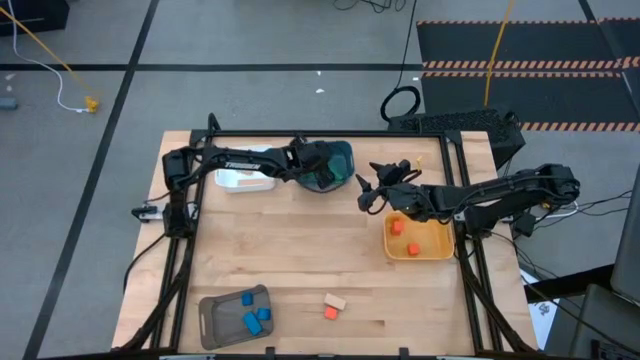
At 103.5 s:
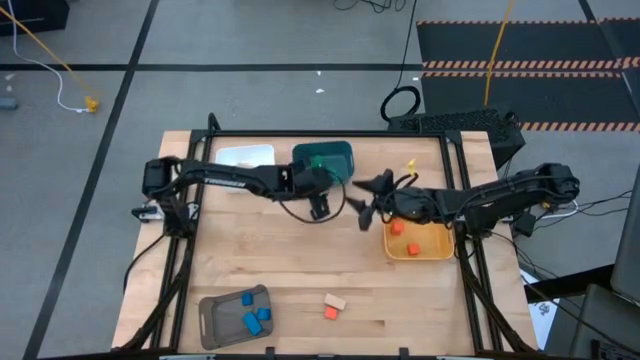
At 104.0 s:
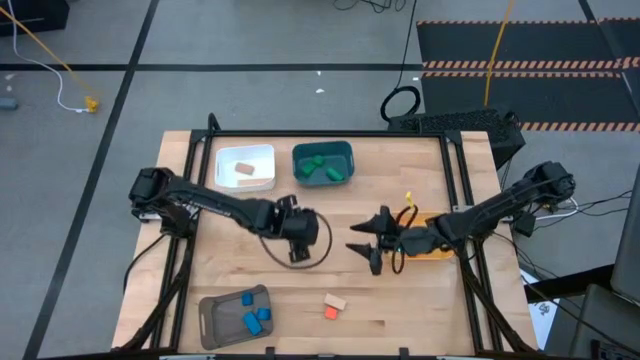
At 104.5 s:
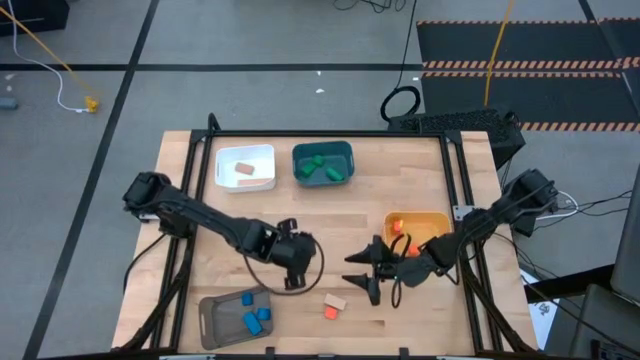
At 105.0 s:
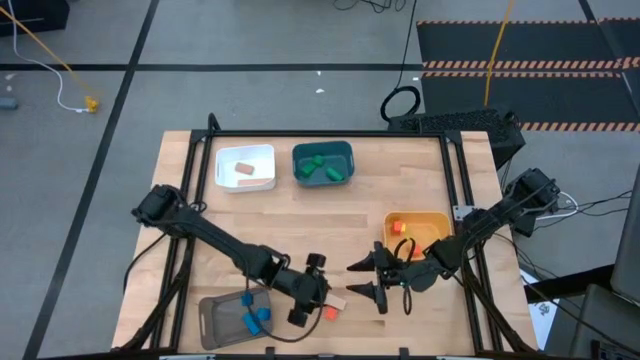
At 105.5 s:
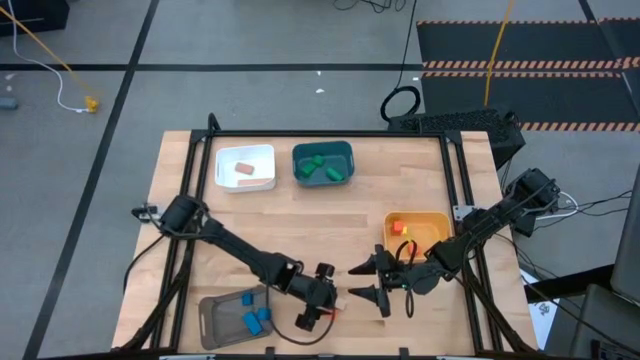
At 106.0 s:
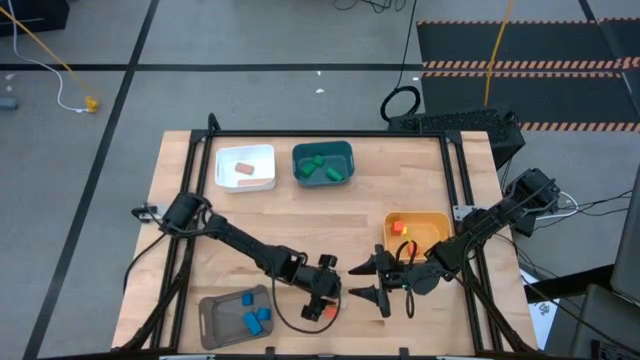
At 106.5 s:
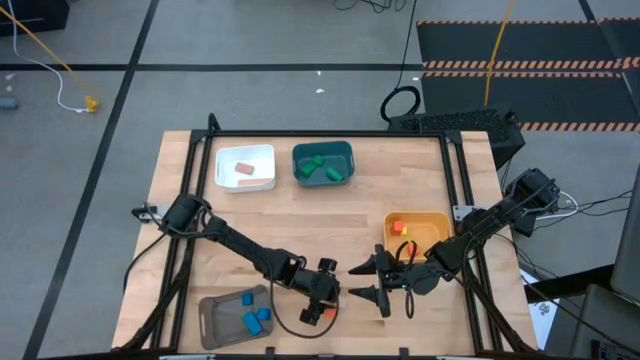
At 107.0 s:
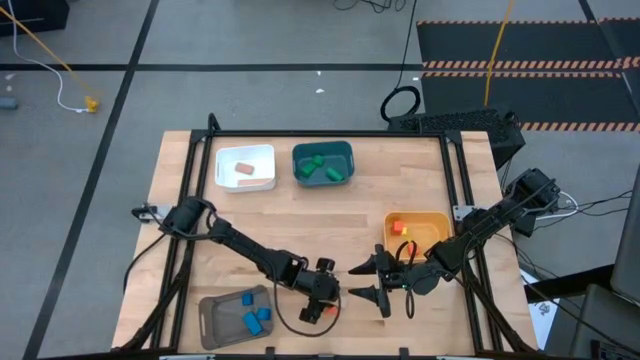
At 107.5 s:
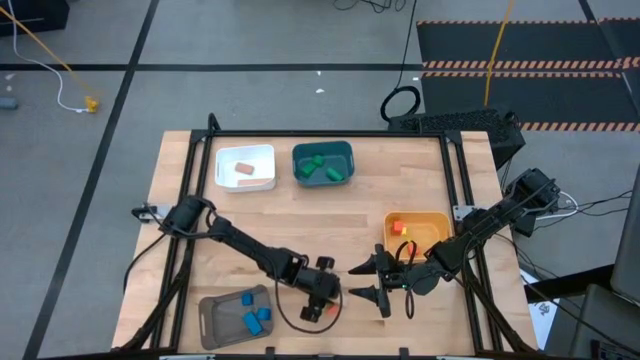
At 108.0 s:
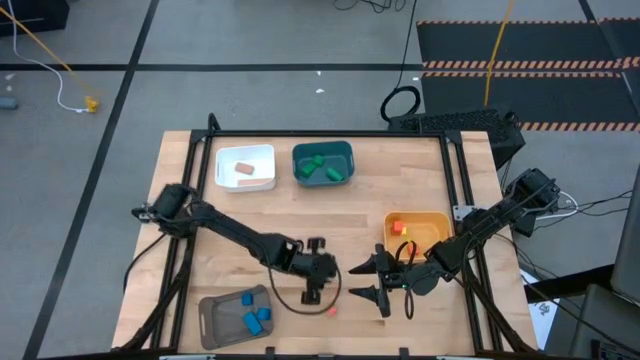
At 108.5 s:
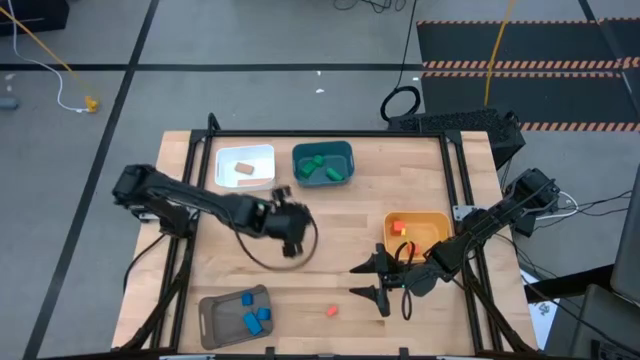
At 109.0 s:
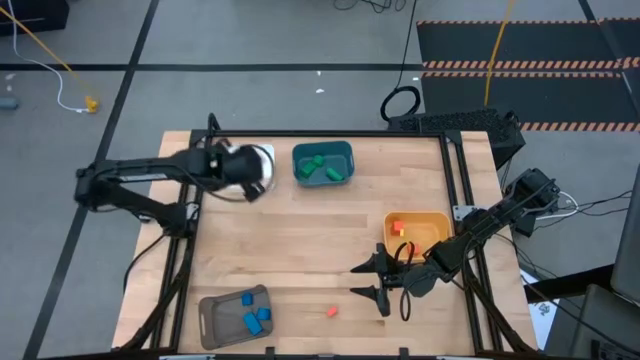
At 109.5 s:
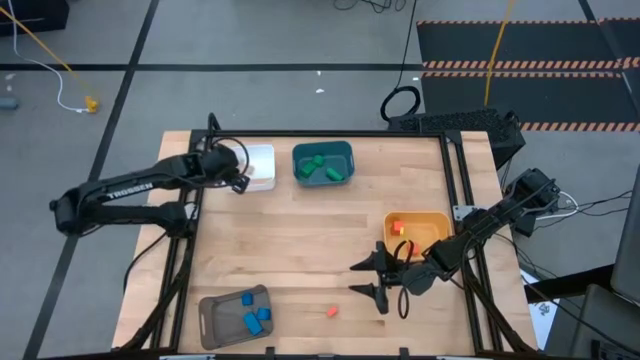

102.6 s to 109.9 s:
Task: Sort & place blocks by color
Put the brown block into the white bin

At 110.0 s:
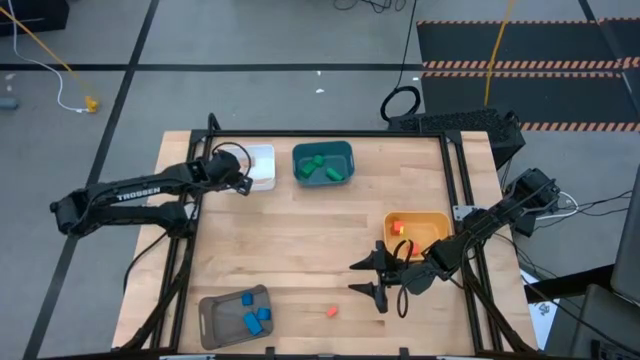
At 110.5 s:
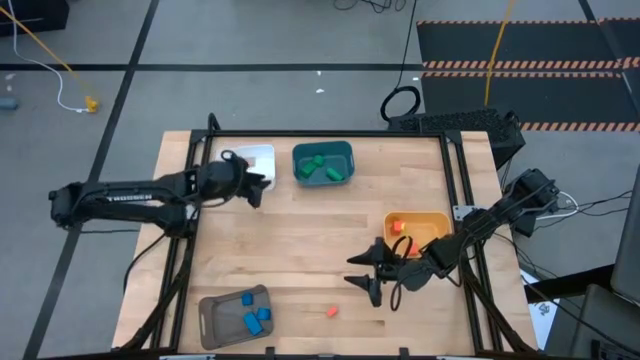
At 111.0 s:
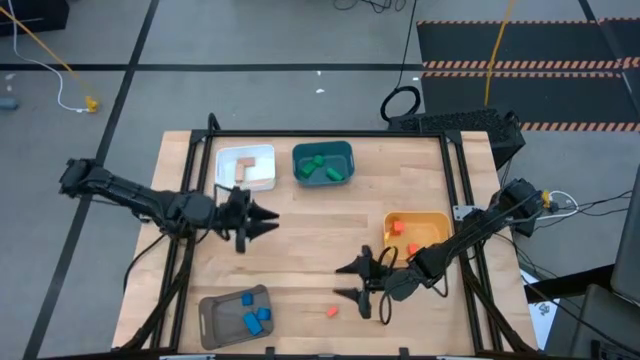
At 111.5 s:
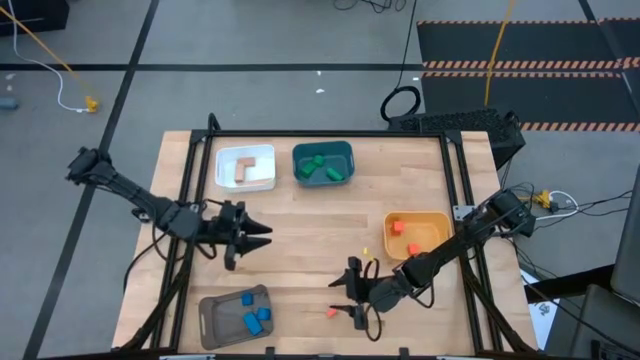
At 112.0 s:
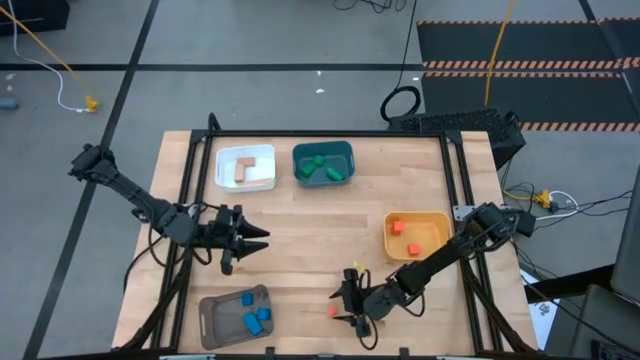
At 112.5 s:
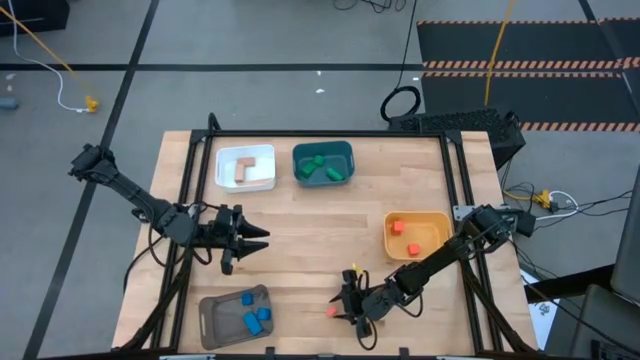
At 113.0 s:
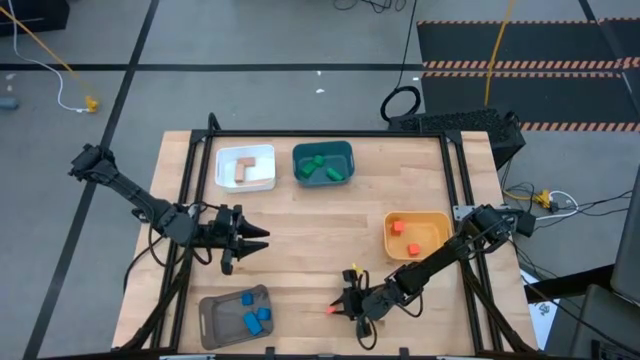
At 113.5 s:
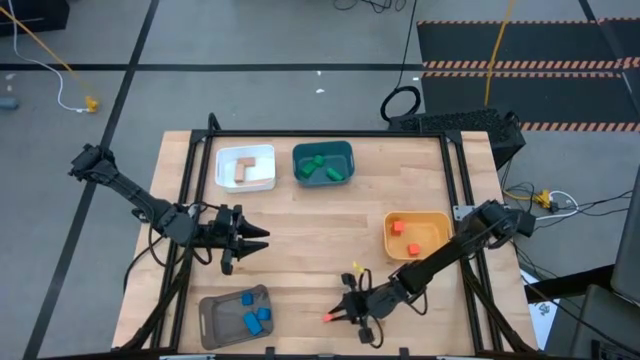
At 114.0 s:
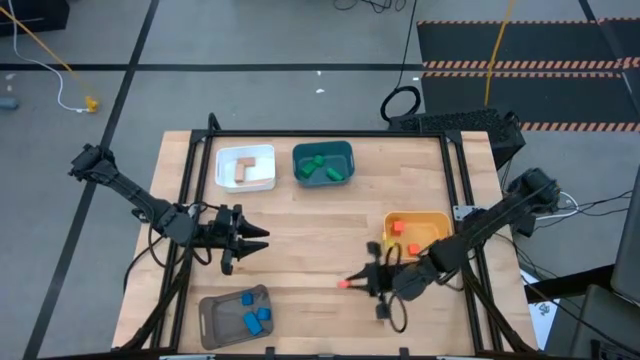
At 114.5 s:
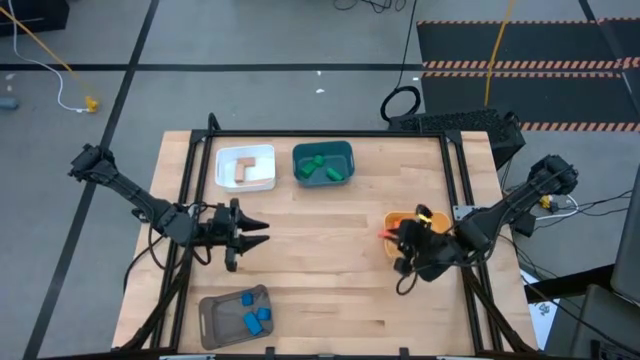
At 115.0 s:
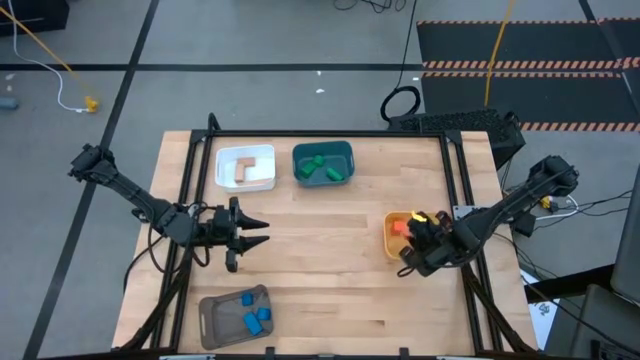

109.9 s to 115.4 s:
Put the orange block into the yellow bin

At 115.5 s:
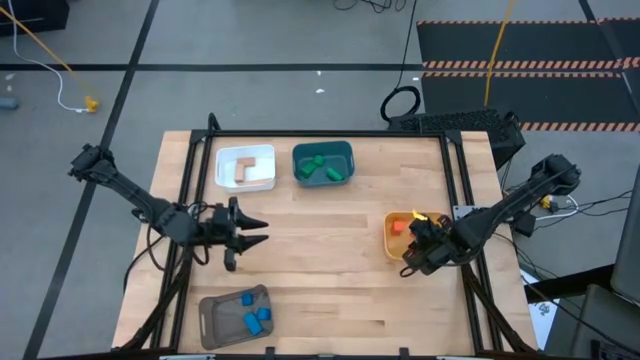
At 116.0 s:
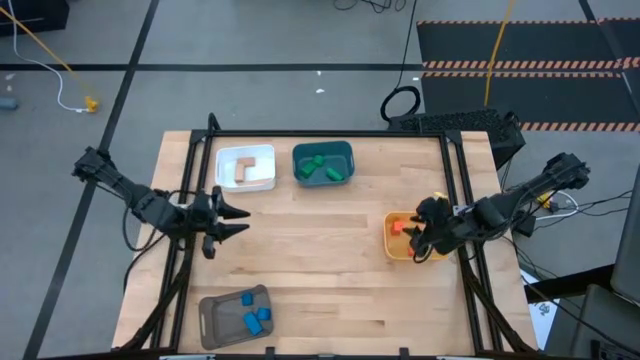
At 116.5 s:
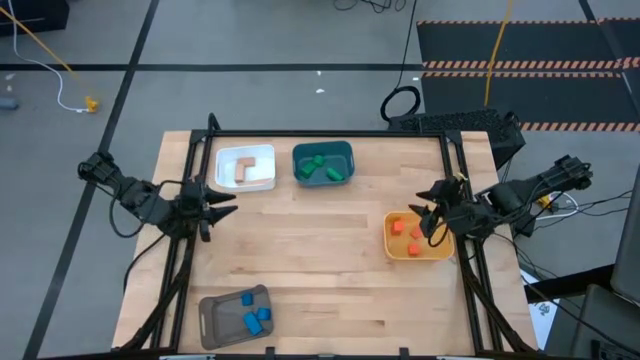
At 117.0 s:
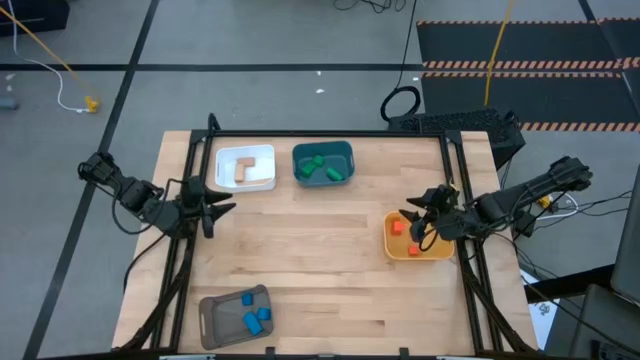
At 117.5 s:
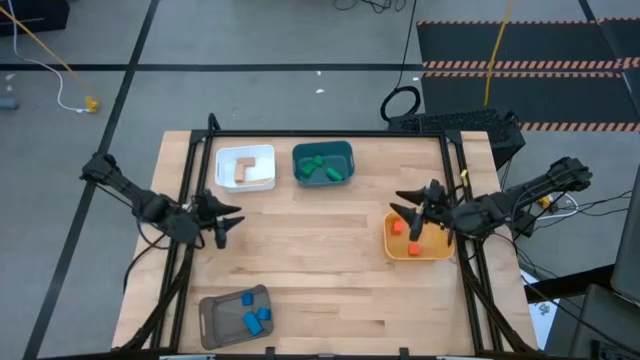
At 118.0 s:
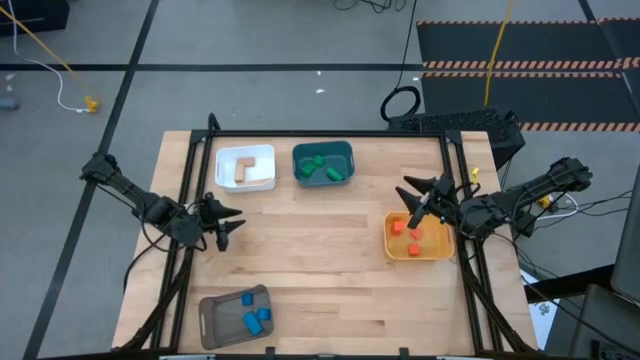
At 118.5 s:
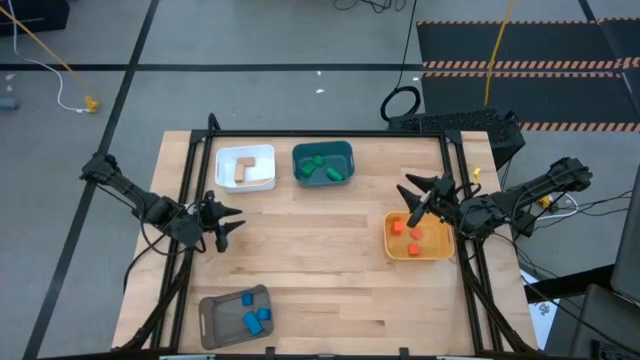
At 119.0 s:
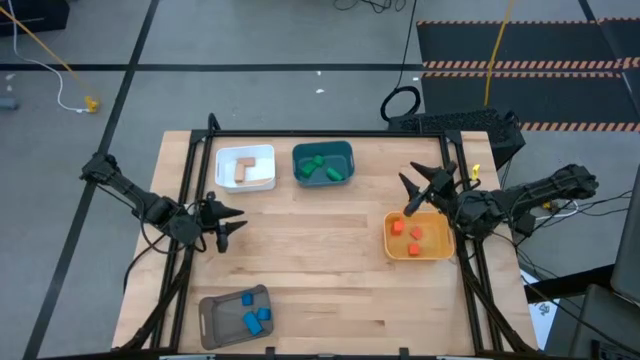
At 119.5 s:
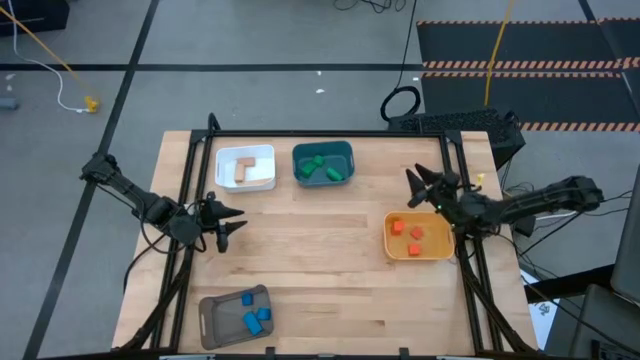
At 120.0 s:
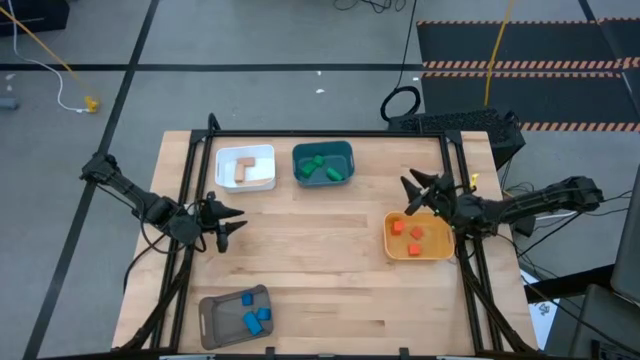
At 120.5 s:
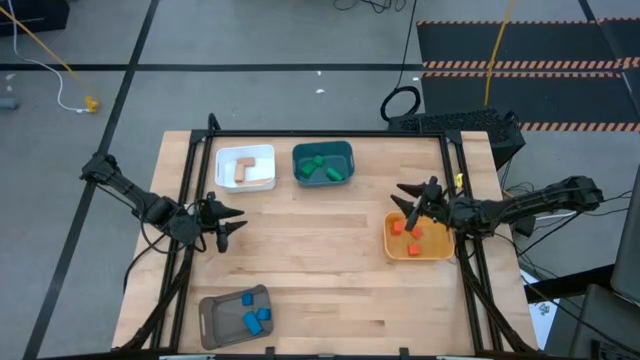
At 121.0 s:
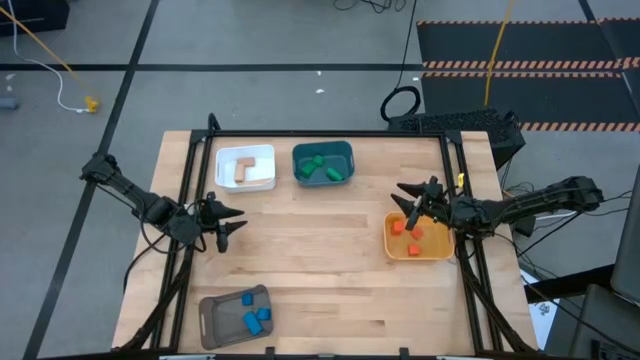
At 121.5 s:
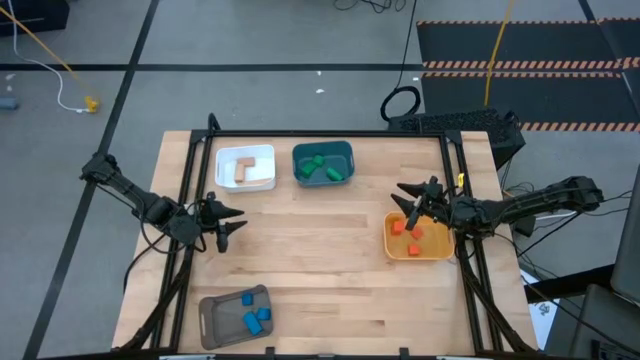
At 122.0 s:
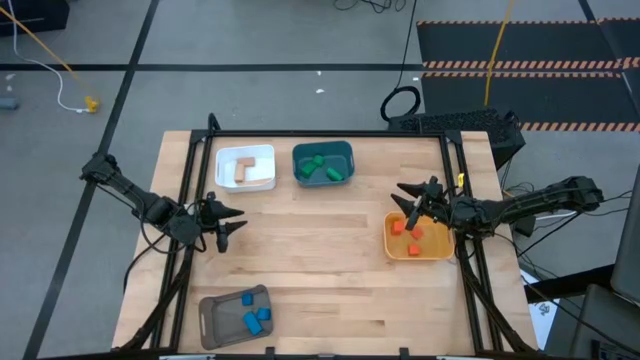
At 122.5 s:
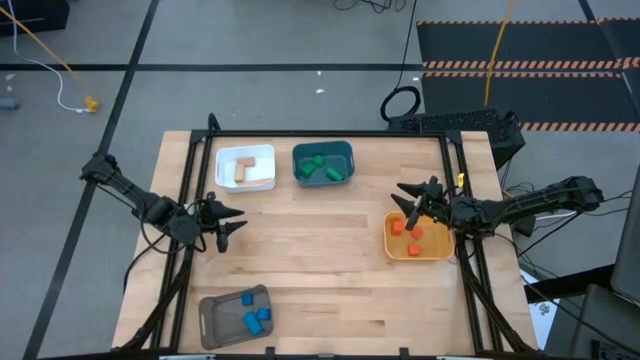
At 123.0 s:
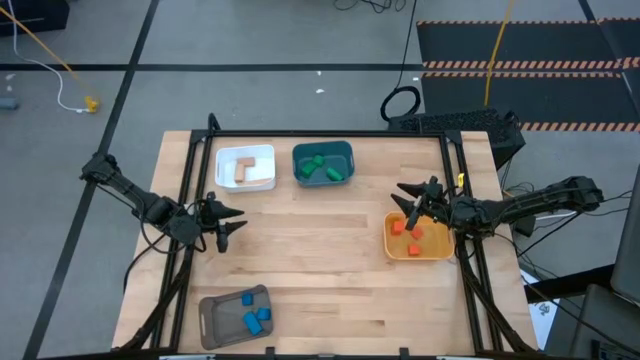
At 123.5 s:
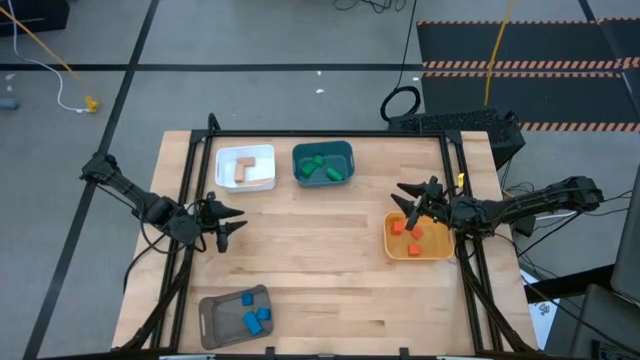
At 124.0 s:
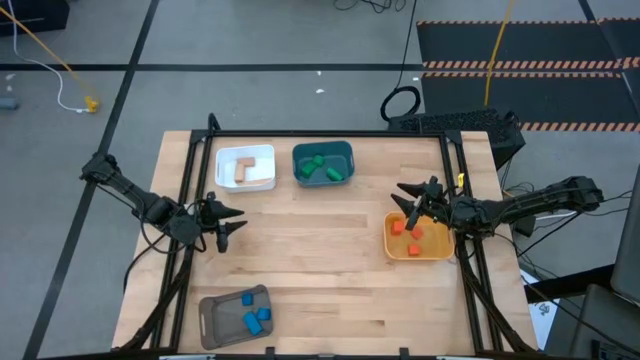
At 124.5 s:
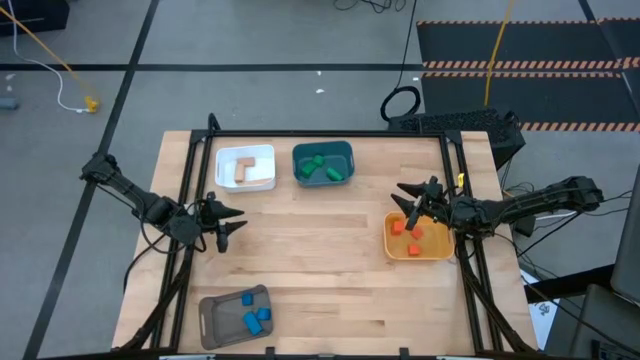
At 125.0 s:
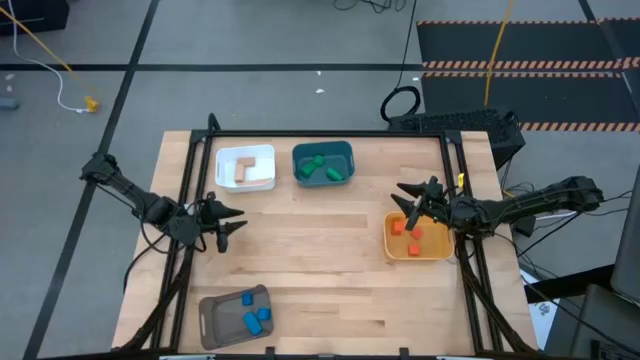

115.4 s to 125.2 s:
Return to Home Position
